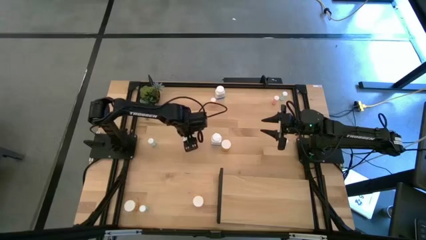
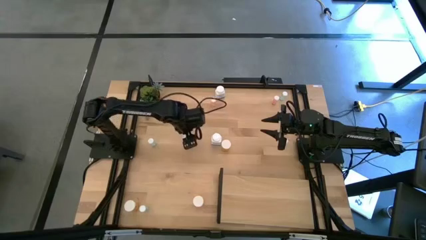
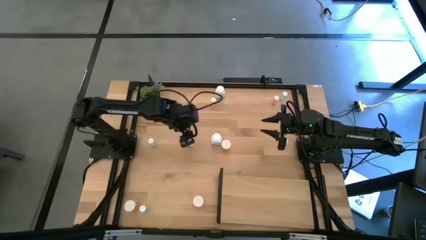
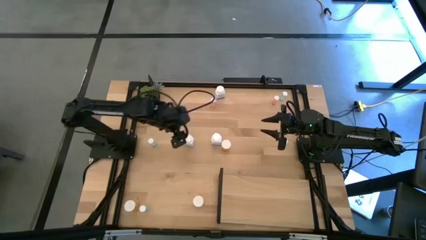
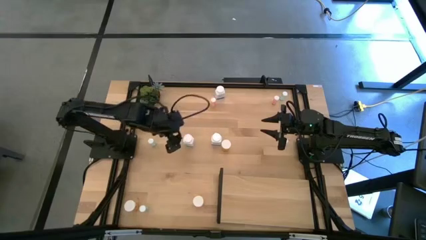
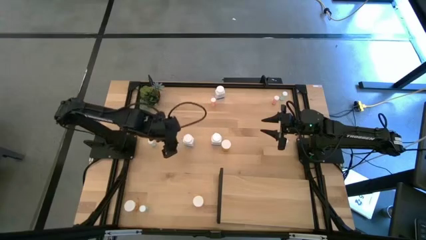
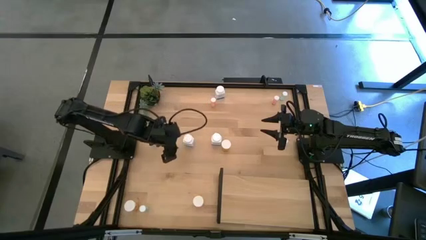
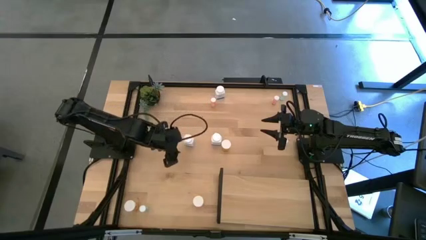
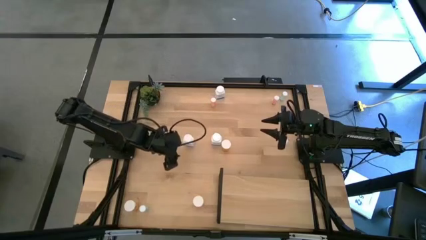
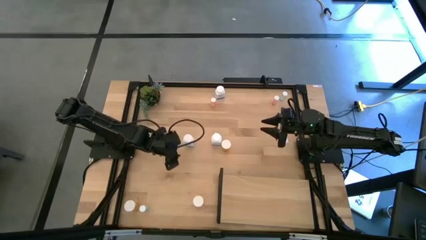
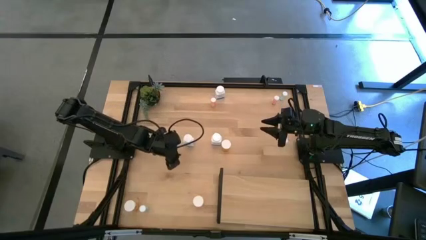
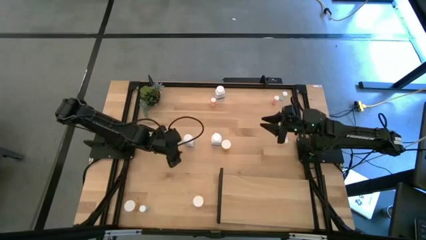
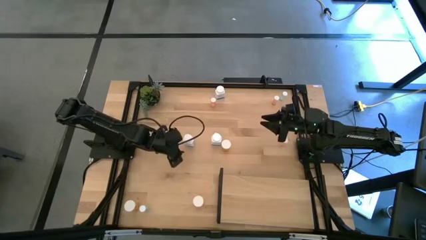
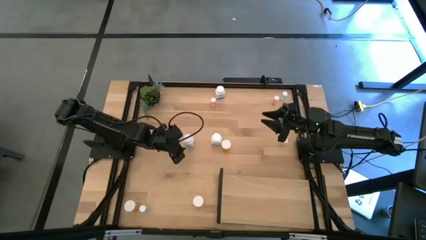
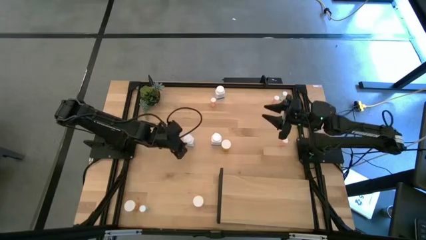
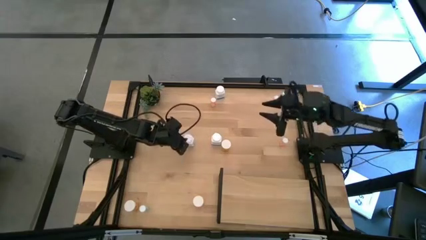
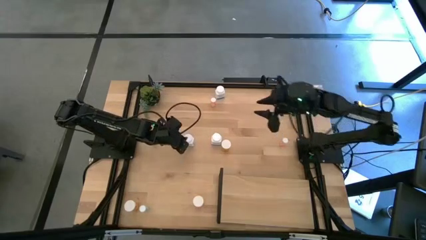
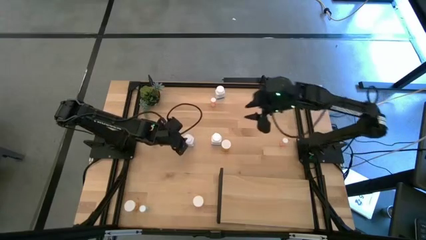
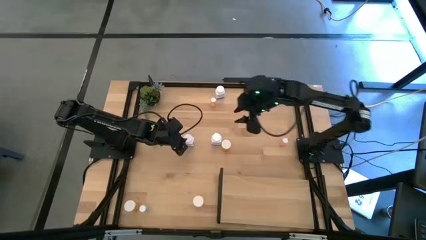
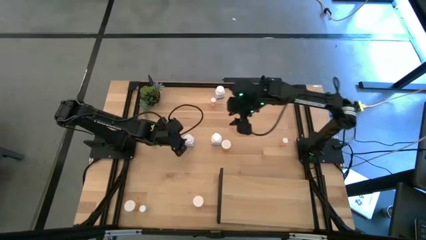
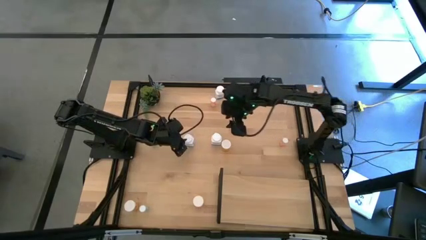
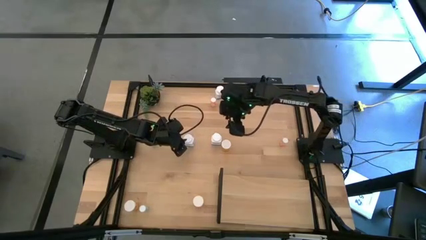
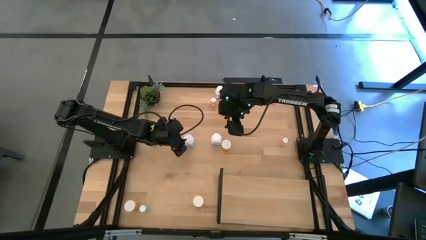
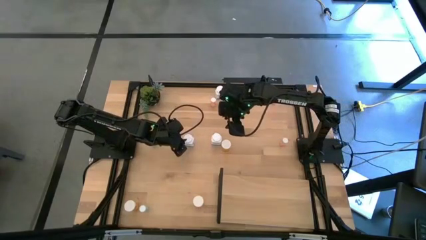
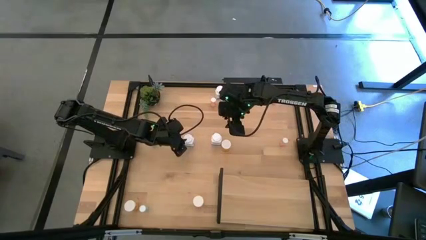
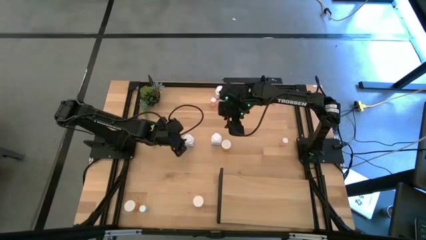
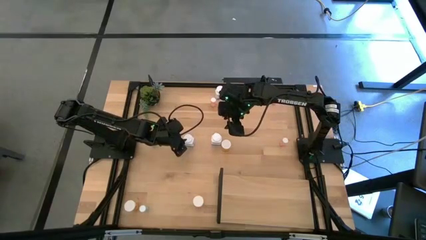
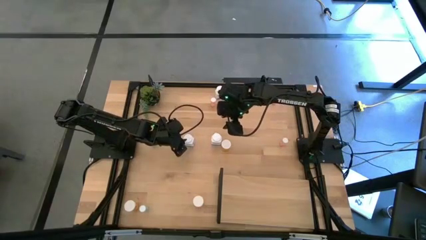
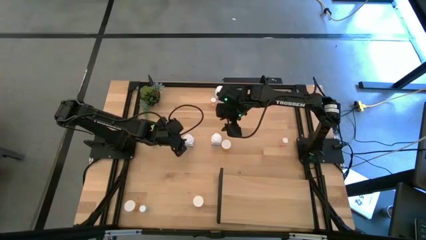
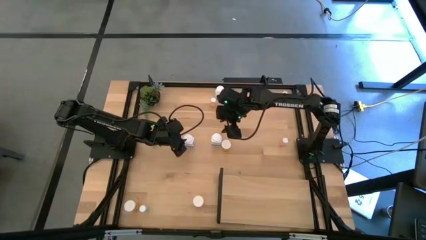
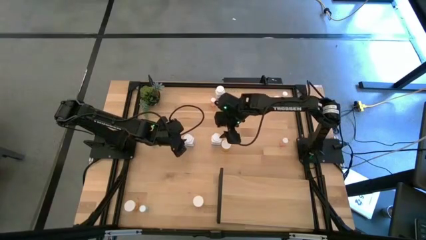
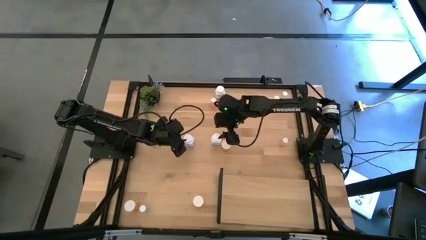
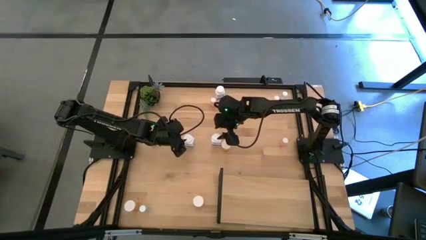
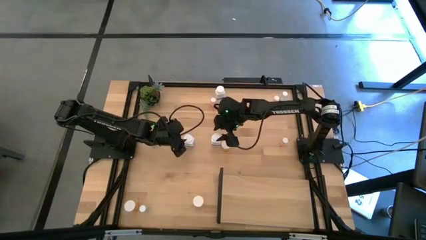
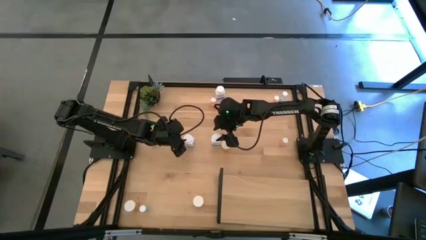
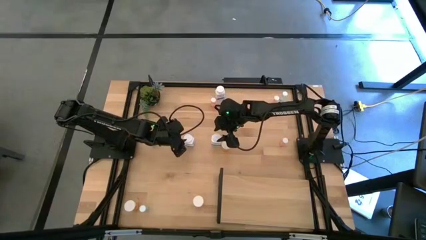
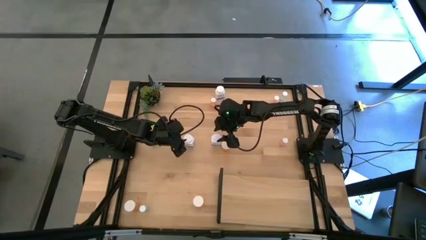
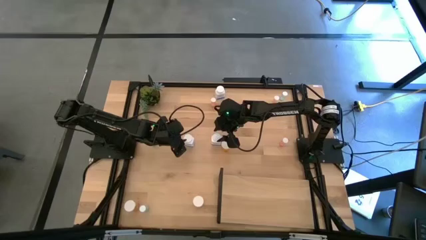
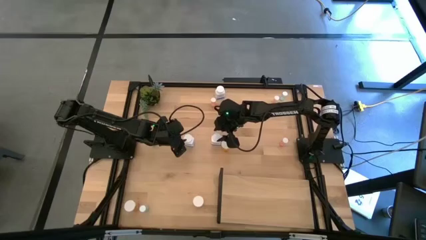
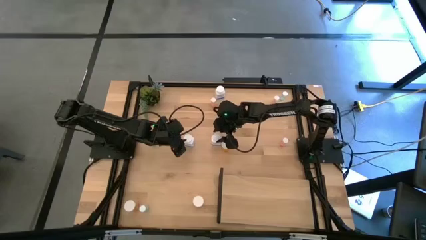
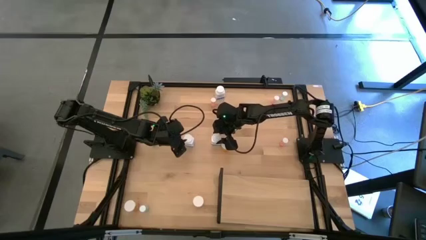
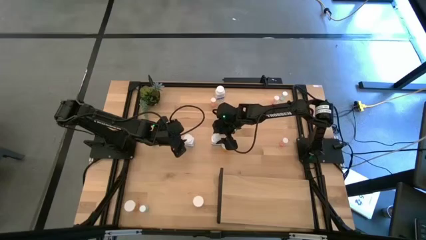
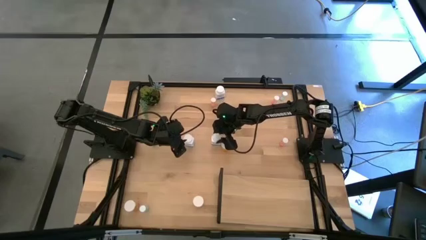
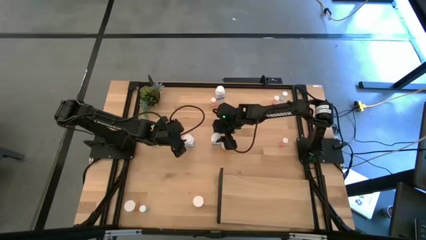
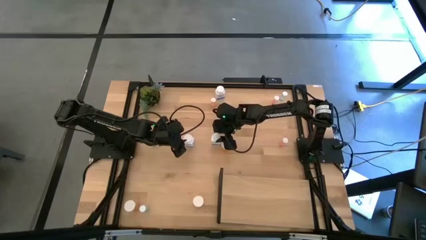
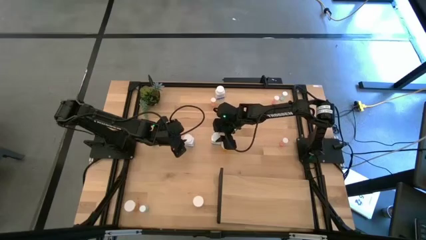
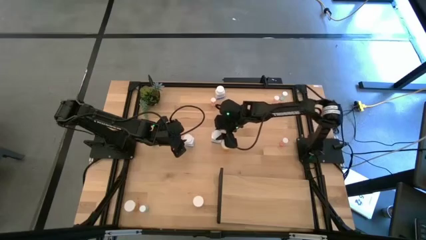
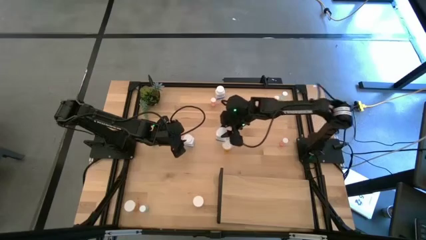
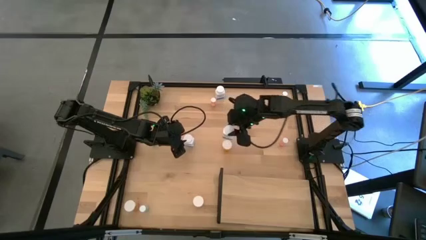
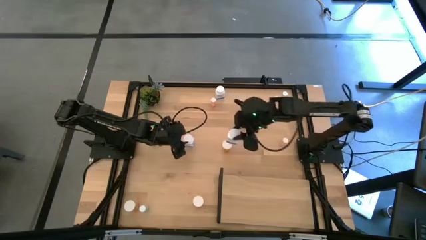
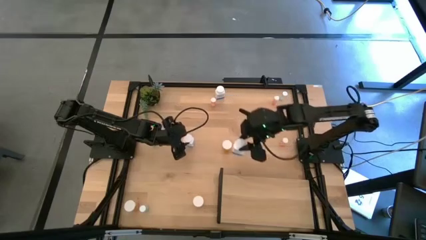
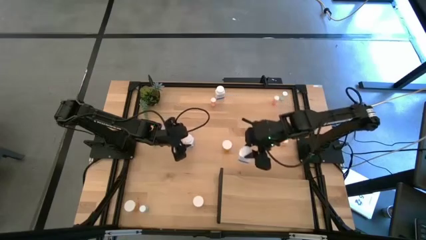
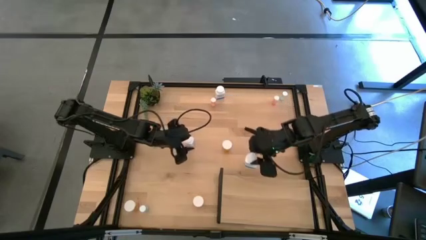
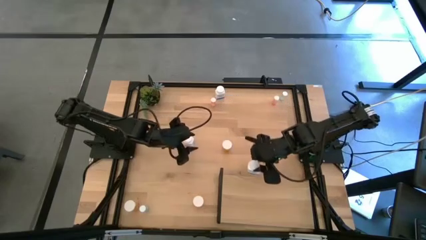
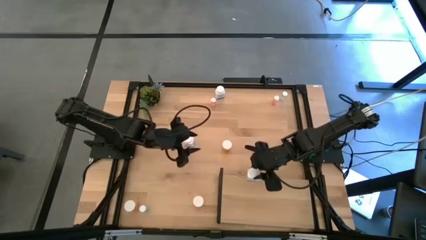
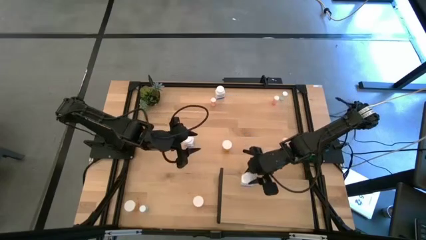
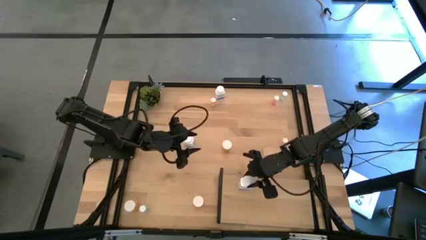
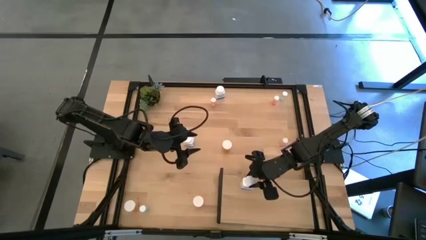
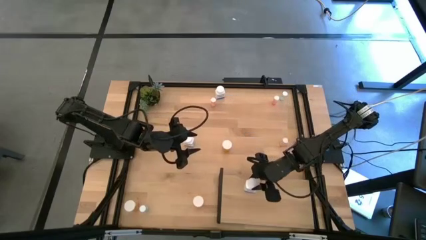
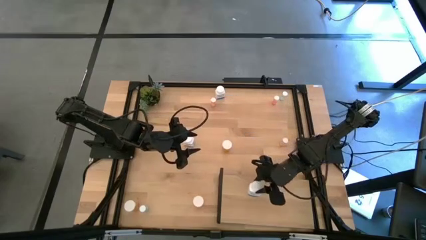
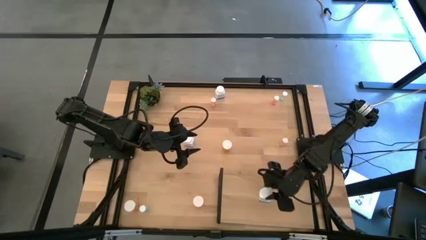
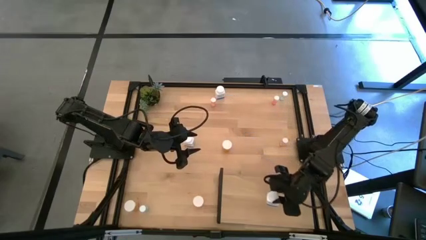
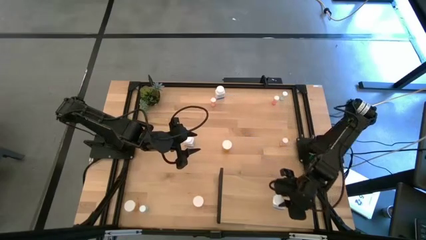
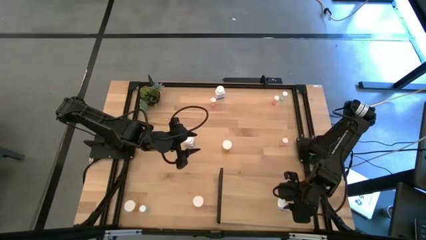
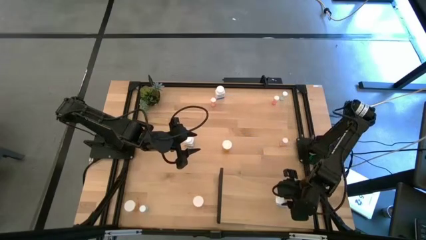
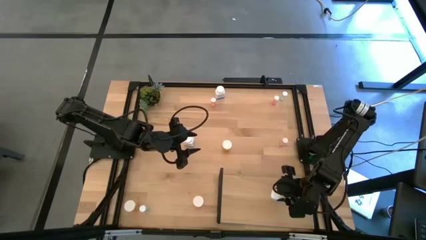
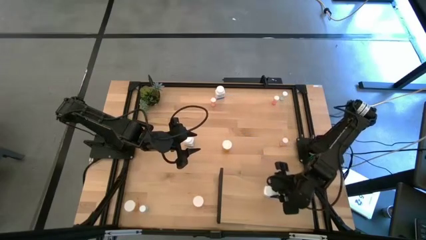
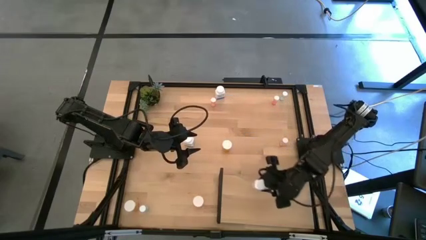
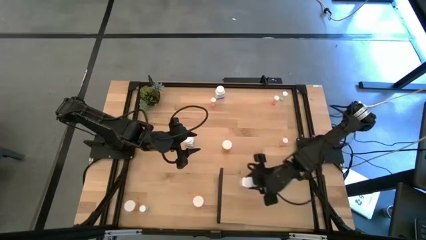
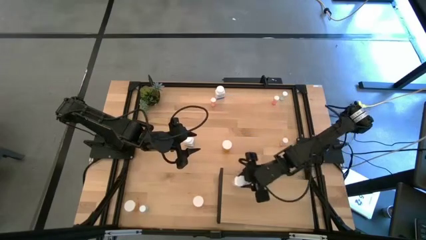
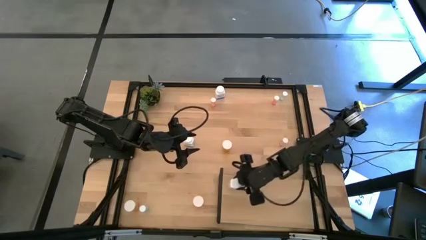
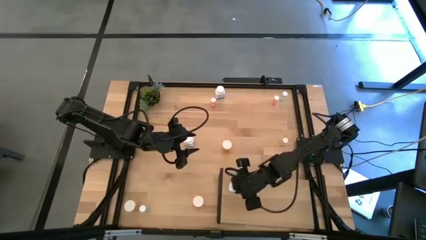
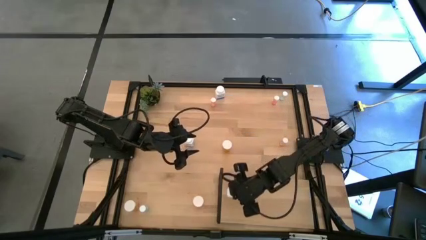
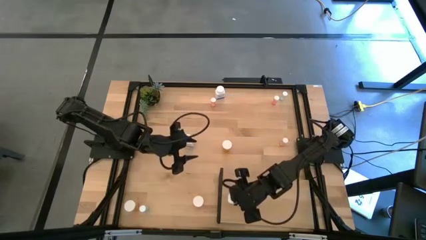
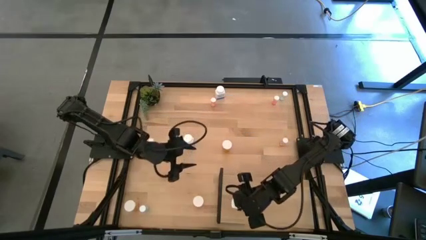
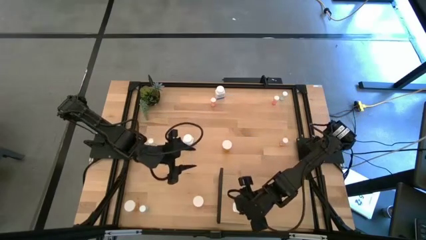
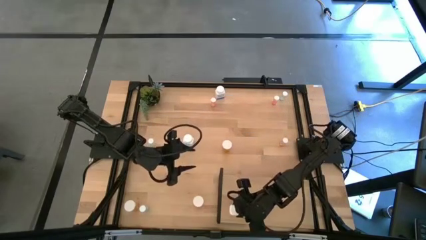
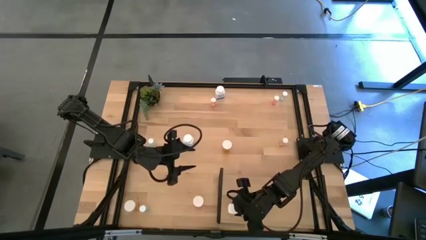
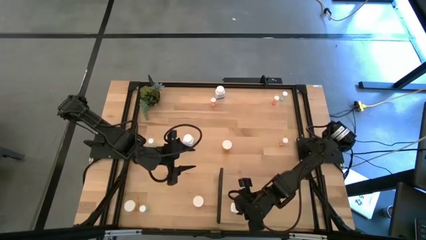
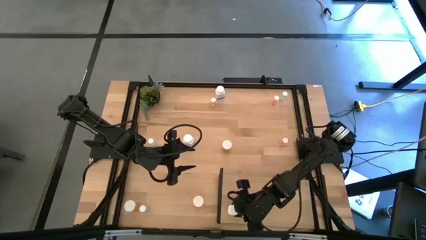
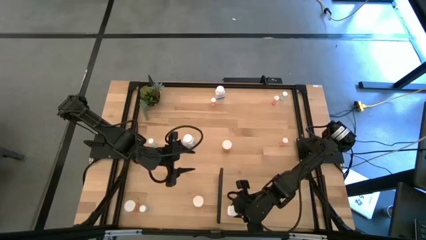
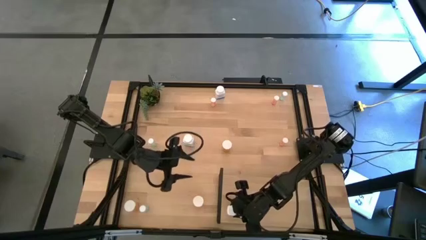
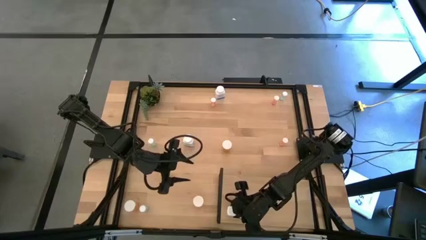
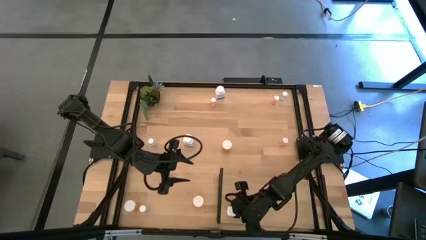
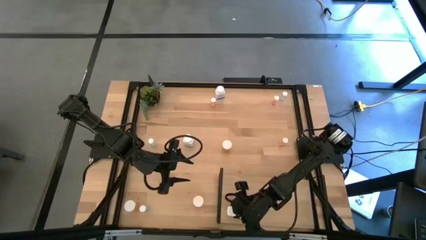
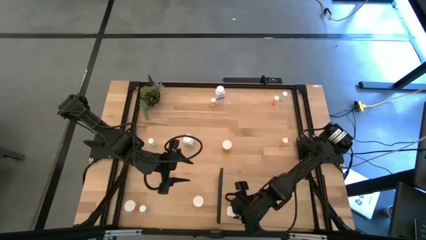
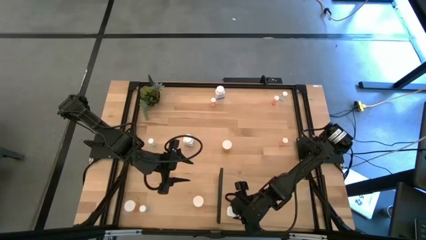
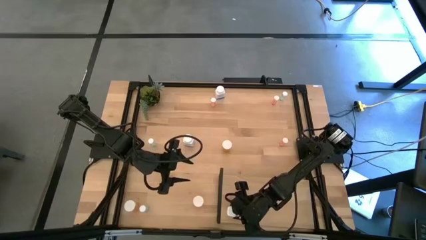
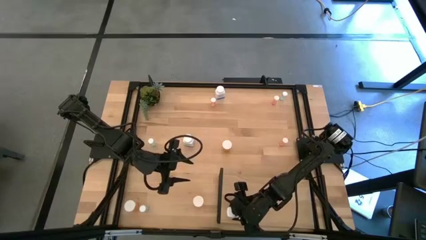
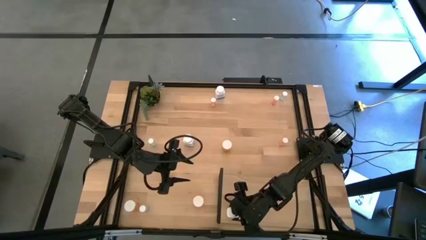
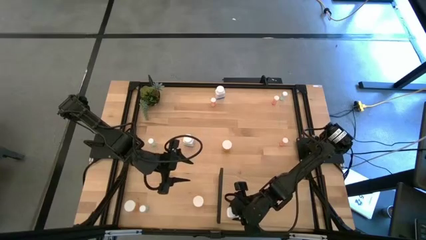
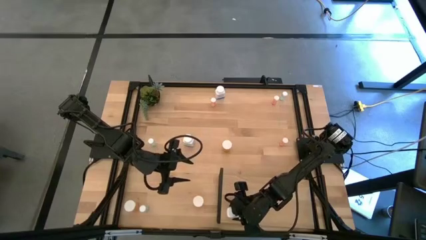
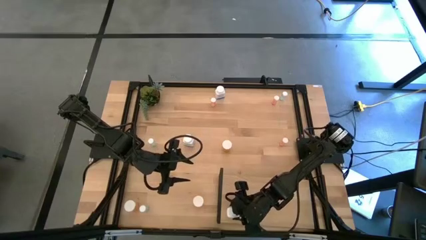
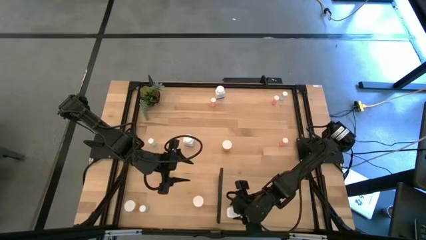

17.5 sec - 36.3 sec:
Task: Pick and place medicine bottles onto shelf by color
Put the middle white pill bottle on the shelf
